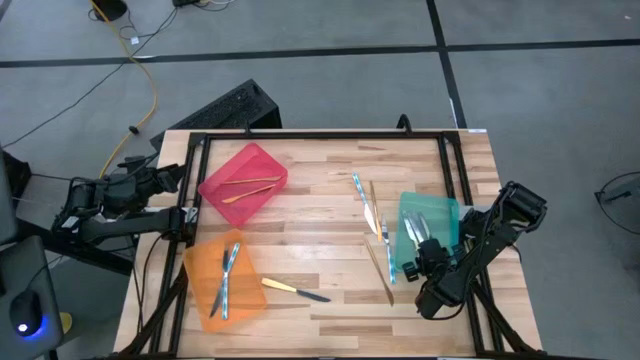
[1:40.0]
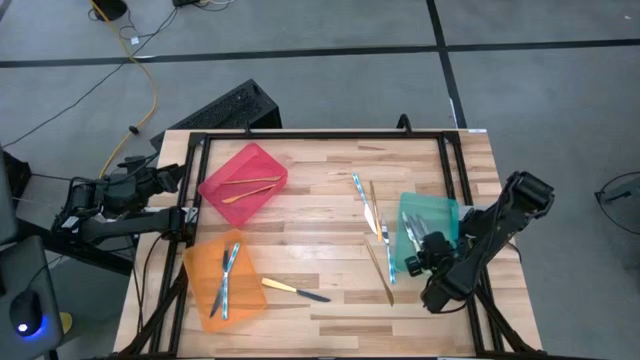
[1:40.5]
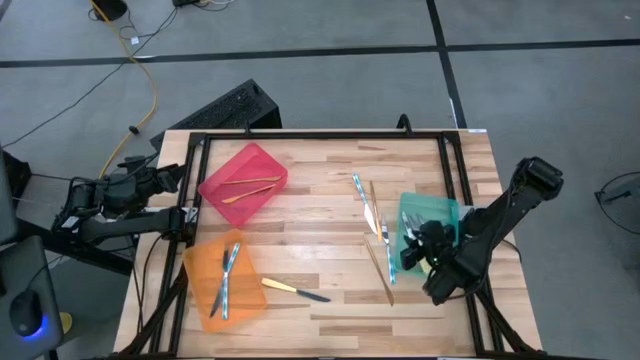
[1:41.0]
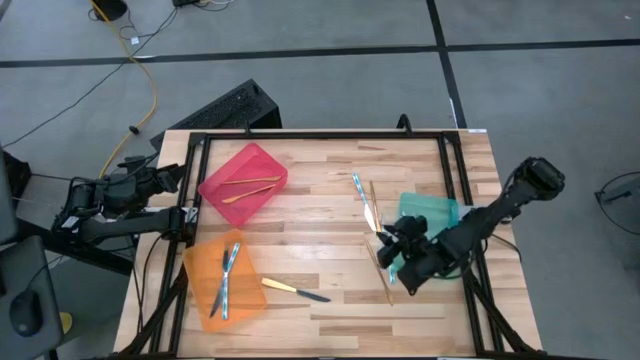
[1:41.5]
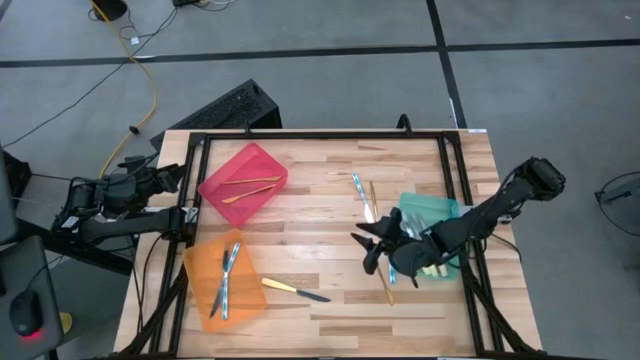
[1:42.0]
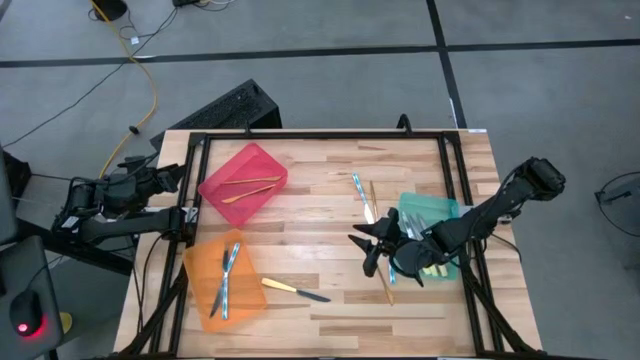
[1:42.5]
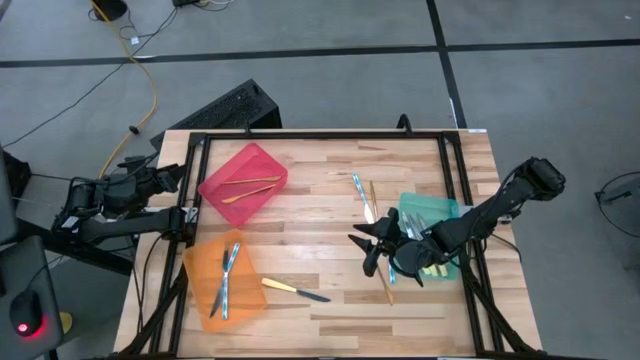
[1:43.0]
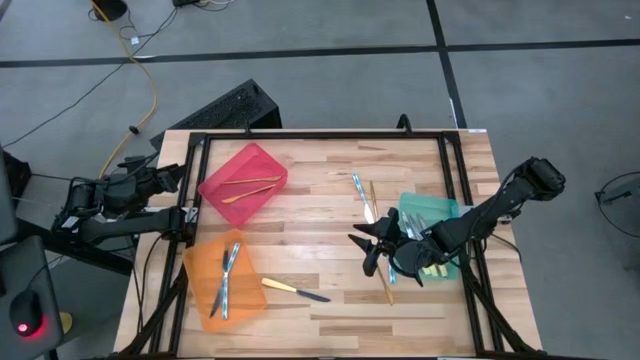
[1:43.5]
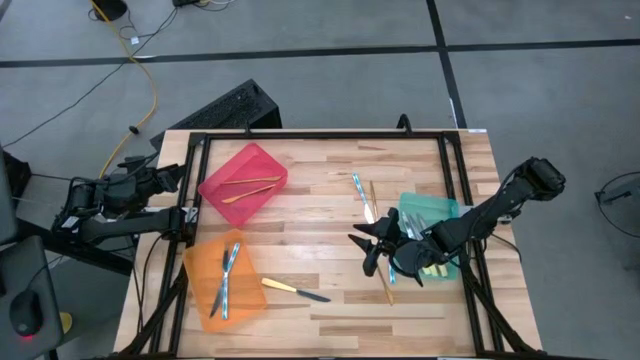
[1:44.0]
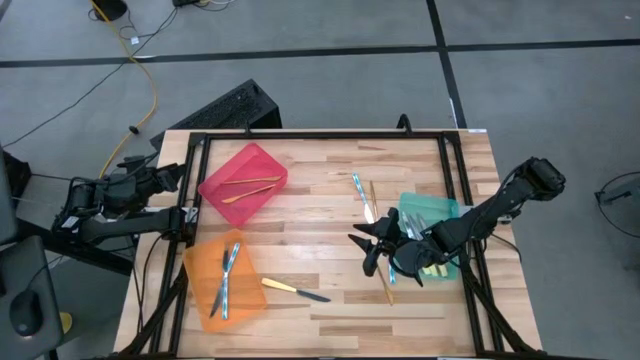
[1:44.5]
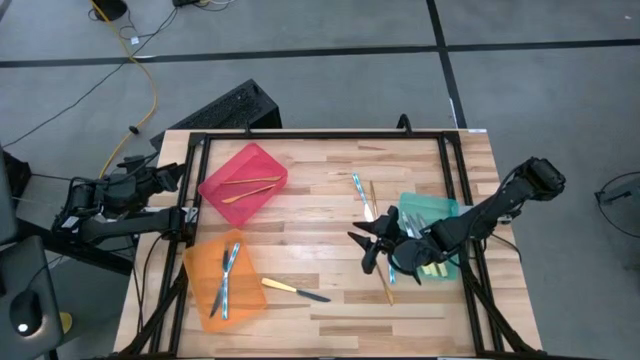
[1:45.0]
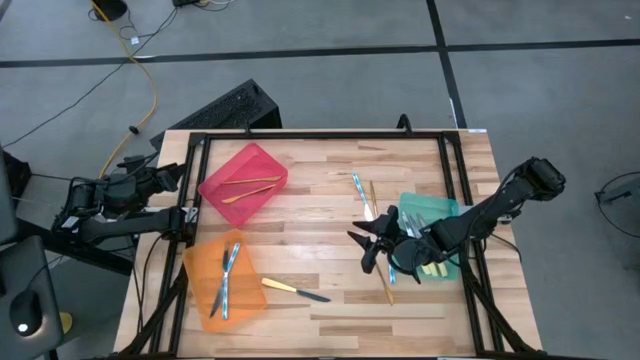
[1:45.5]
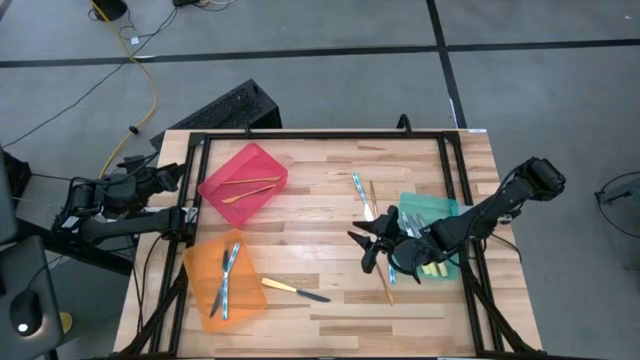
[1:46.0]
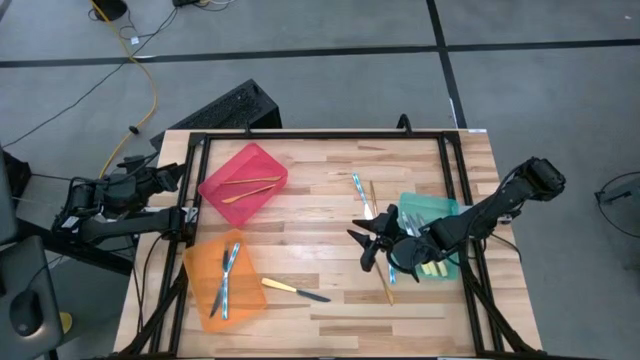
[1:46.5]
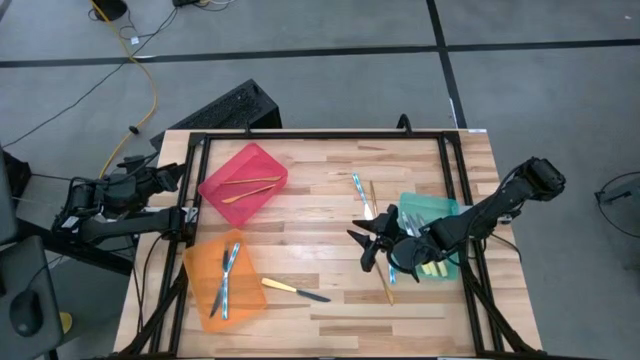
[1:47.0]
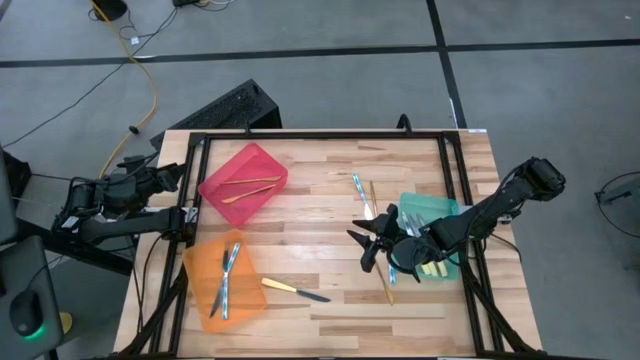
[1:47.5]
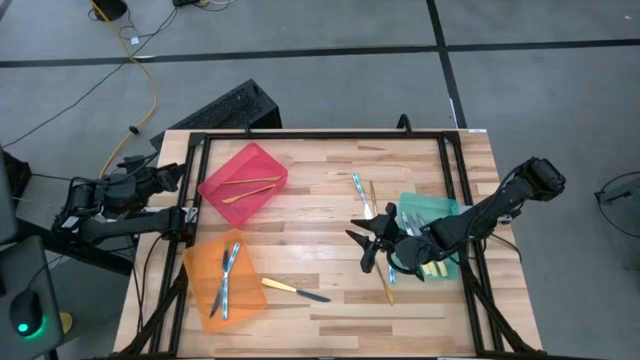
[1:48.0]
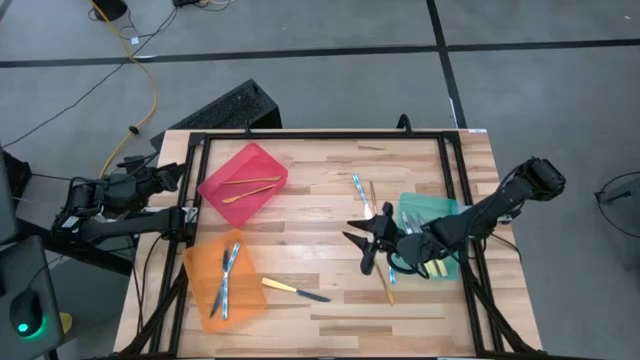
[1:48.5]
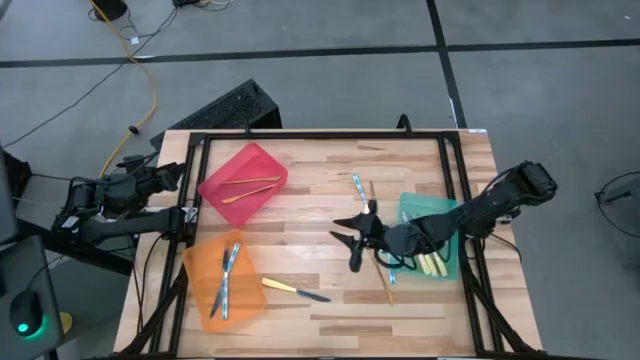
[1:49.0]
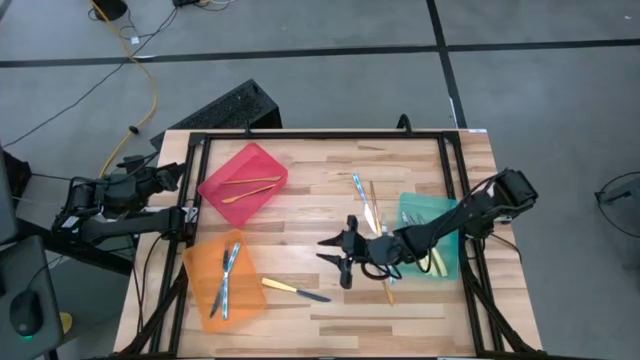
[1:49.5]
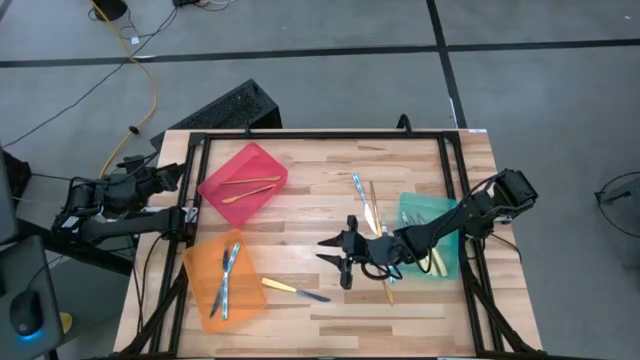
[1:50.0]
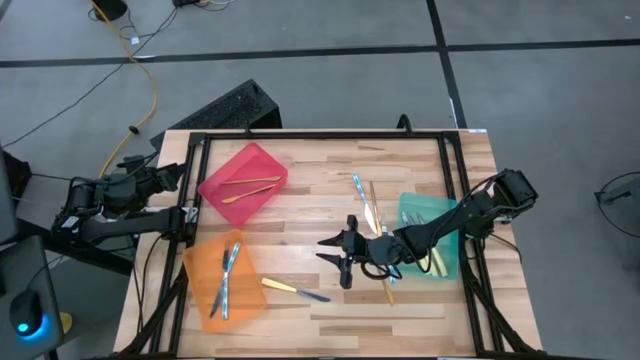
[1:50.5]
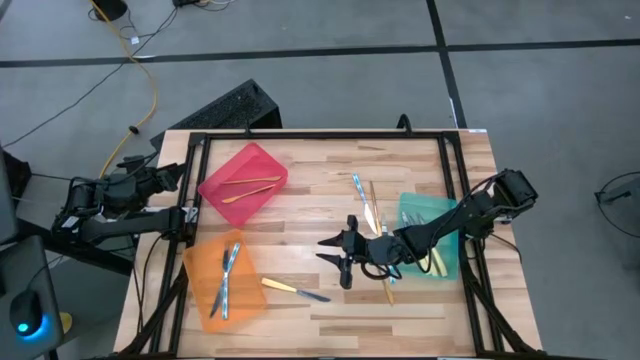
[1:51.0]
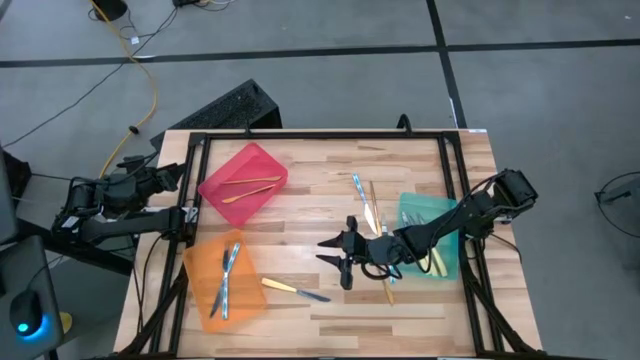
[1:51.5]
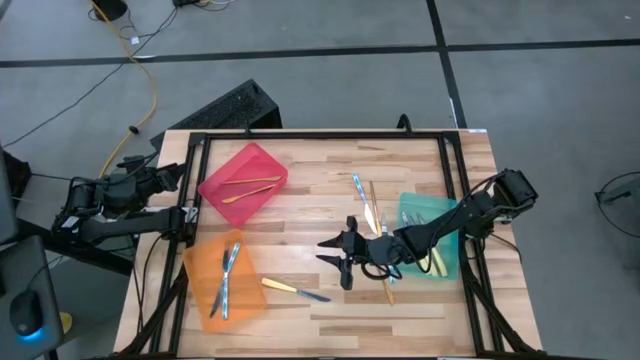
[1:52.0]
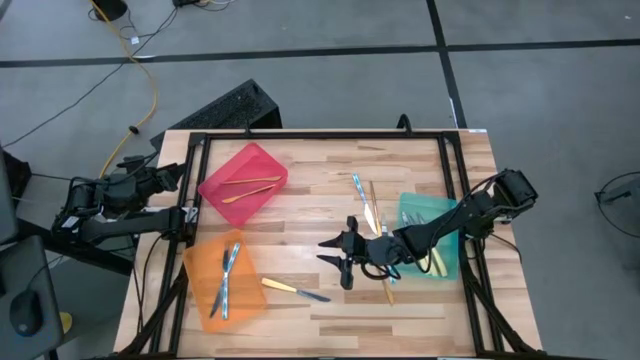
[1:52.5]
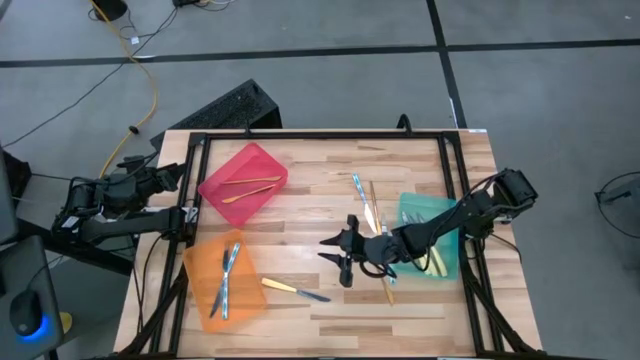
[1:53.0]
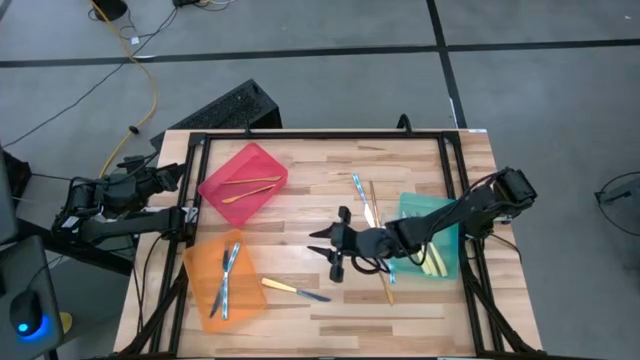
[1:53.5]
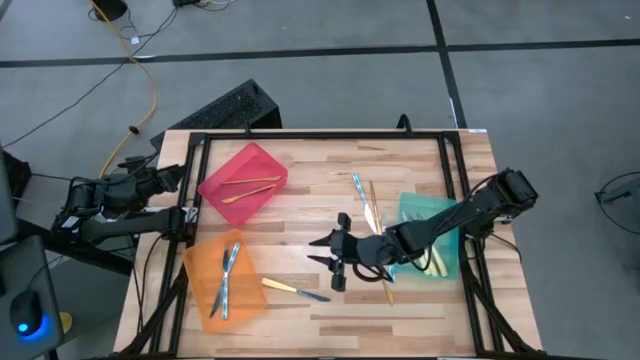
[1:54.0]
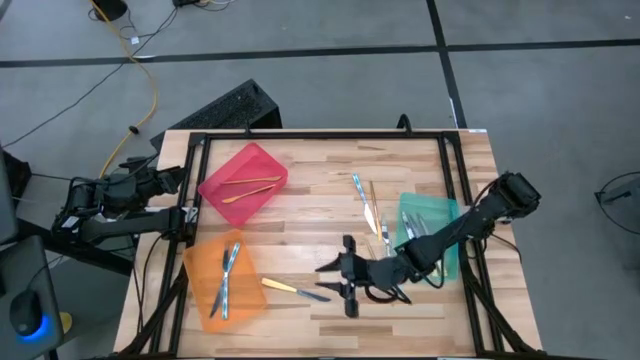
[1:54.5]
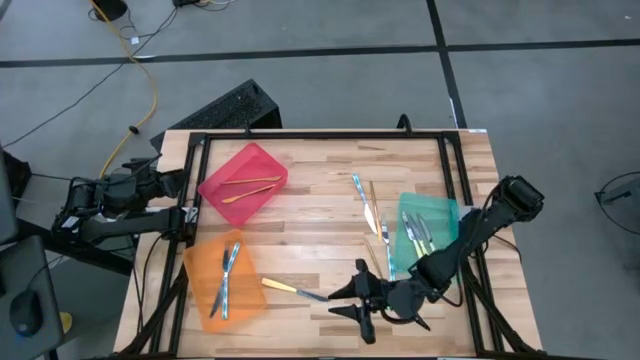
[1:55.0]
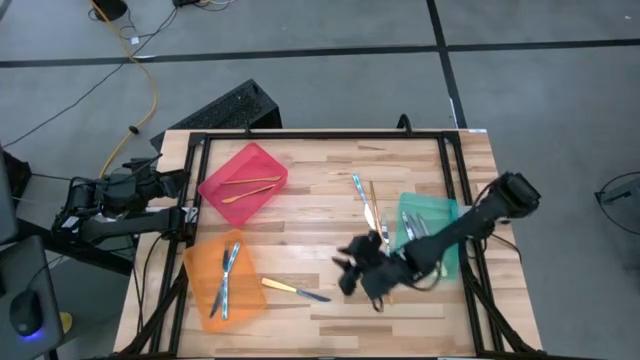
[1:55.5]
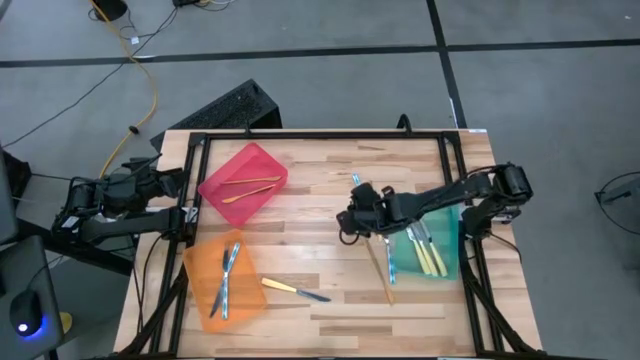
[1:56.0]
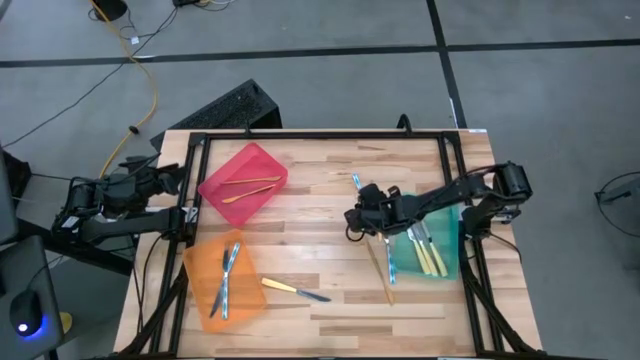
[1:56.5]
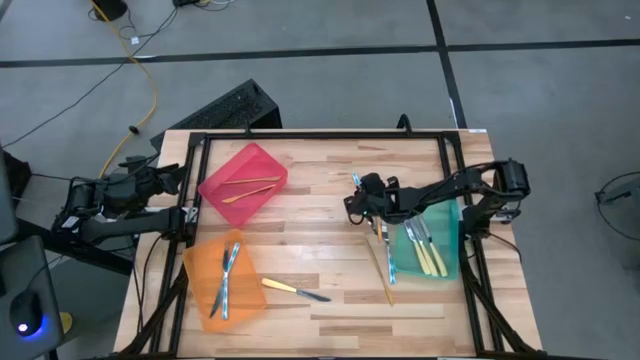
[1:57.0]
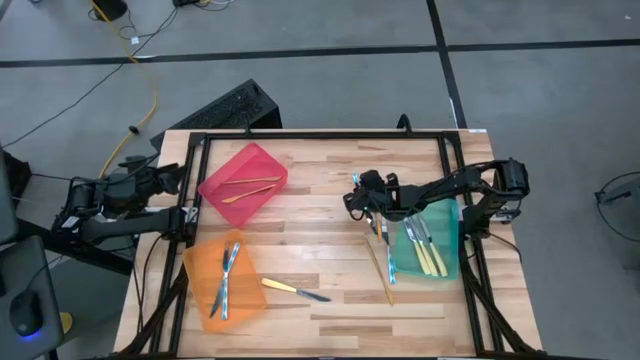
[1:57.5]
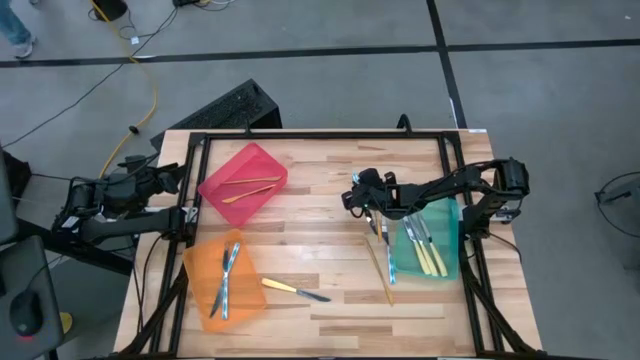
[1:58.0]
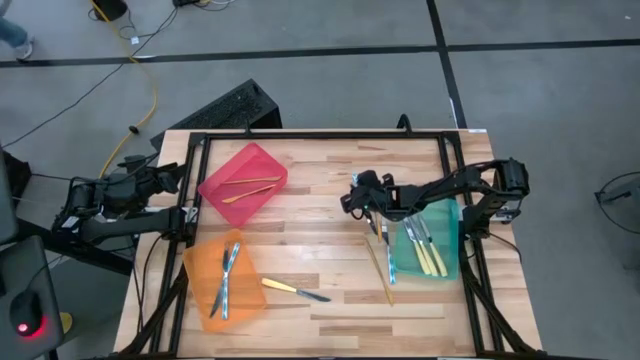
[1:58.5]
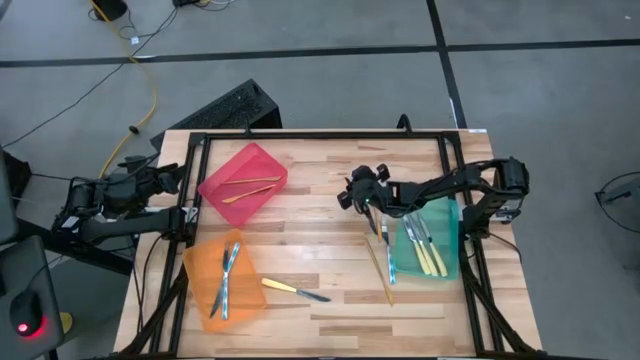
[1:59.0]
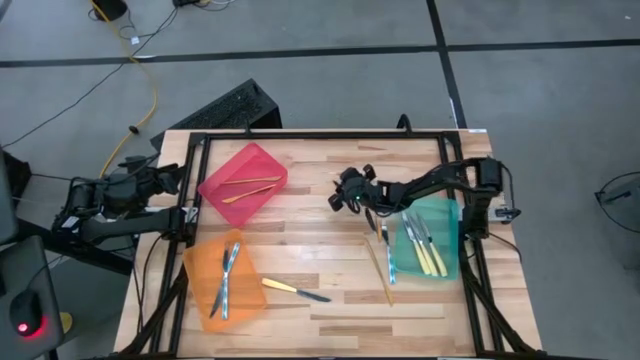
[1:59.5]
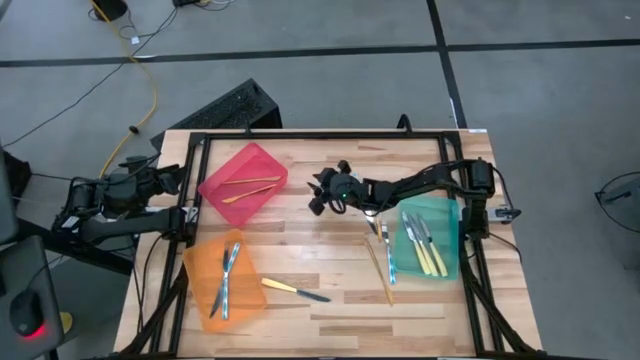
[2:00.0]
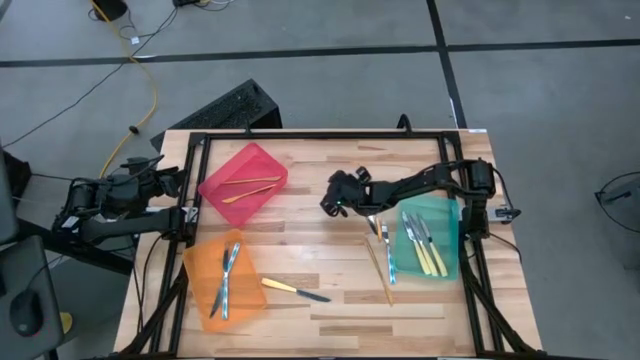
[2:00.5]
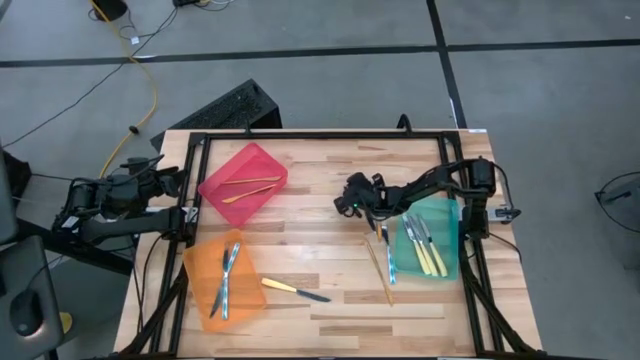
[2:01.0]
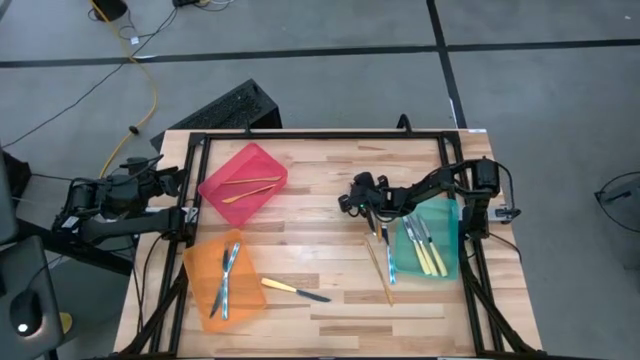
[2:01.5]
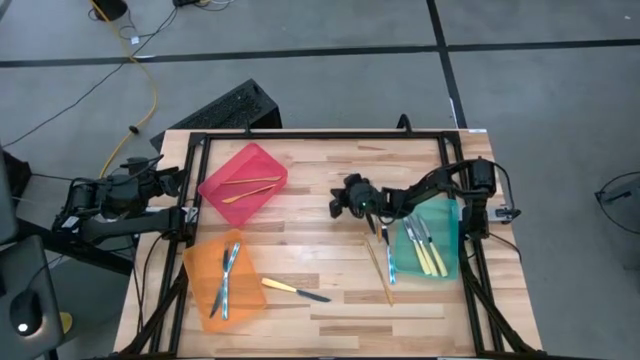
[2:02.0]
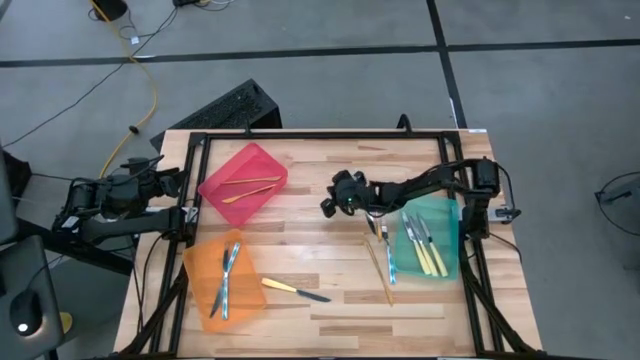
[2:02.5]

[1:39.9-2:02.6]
Task: Sort silverware by color (type)
Put the top blue knife into the orange bin
